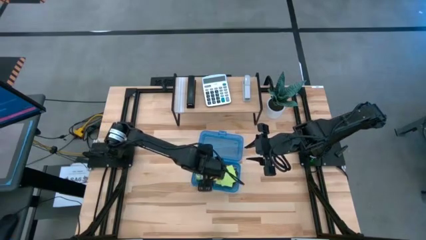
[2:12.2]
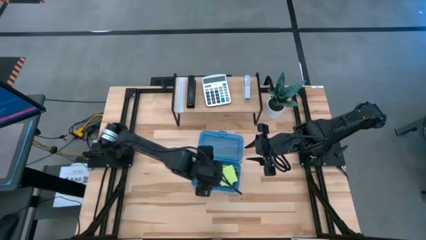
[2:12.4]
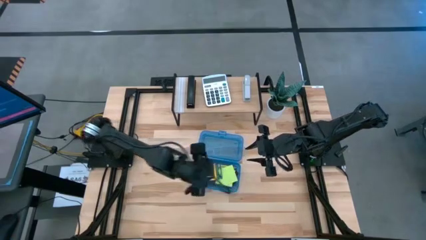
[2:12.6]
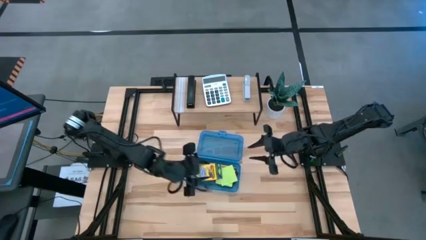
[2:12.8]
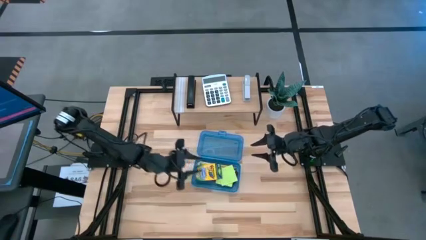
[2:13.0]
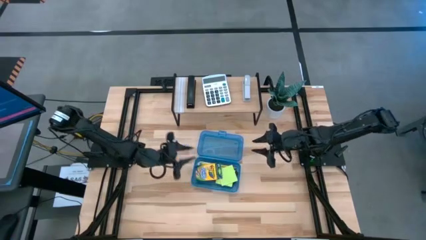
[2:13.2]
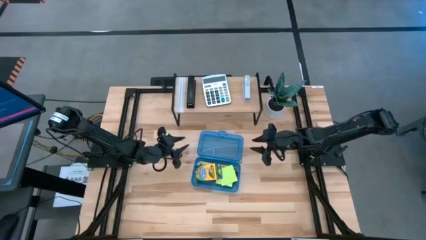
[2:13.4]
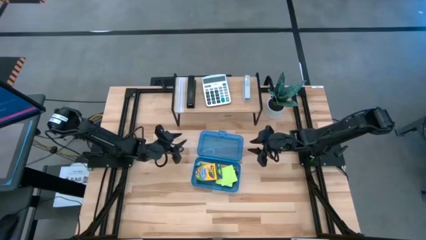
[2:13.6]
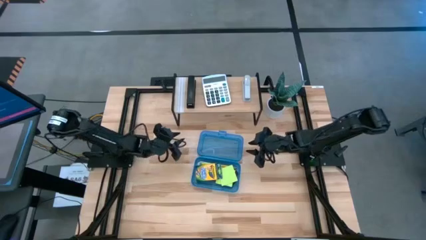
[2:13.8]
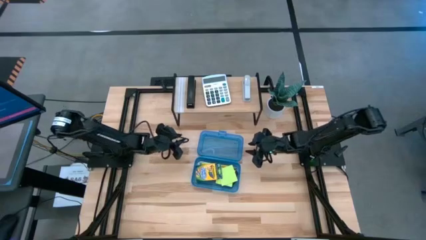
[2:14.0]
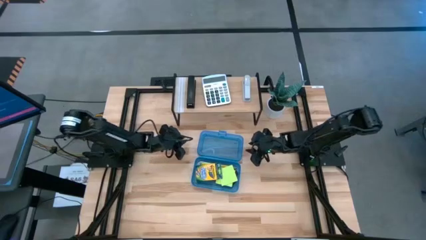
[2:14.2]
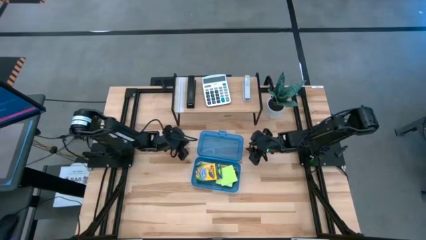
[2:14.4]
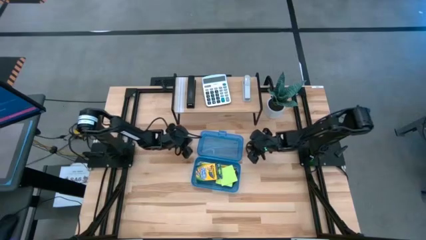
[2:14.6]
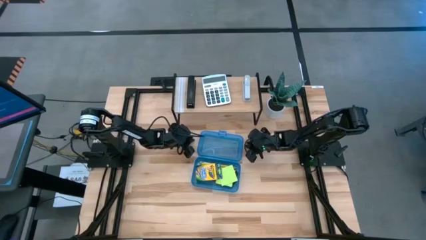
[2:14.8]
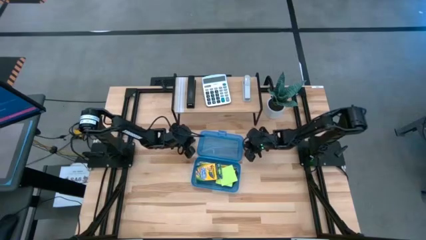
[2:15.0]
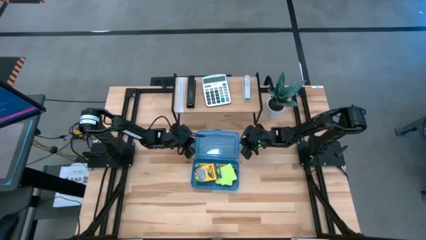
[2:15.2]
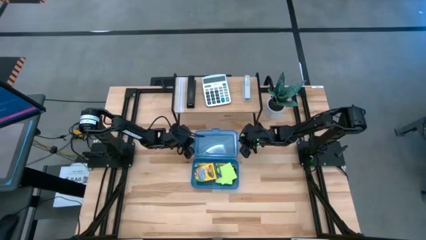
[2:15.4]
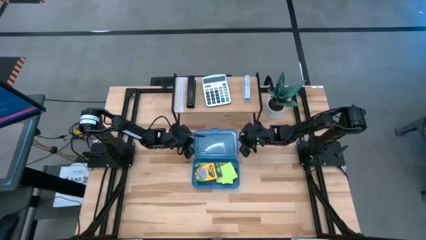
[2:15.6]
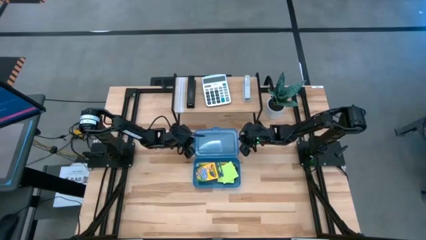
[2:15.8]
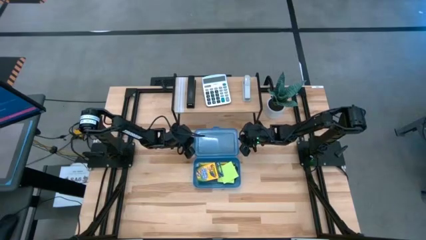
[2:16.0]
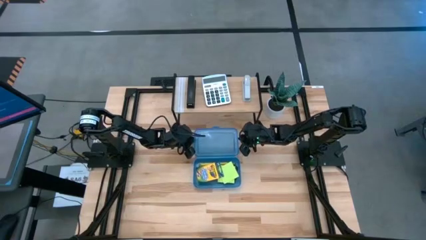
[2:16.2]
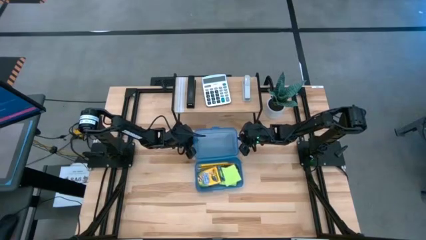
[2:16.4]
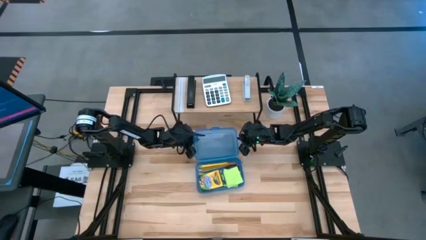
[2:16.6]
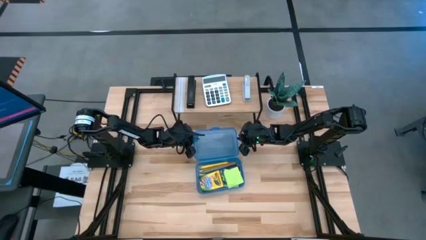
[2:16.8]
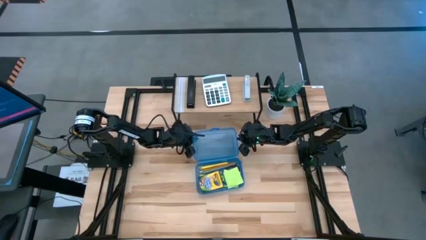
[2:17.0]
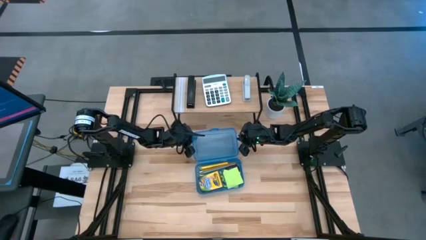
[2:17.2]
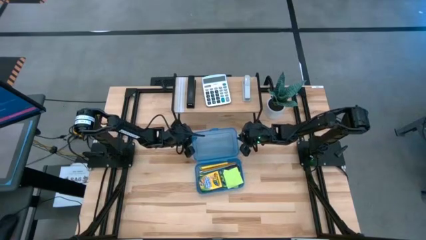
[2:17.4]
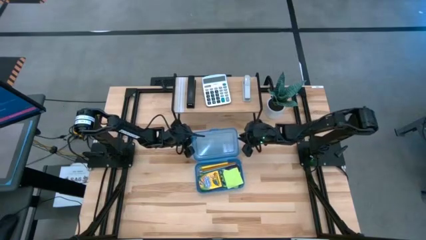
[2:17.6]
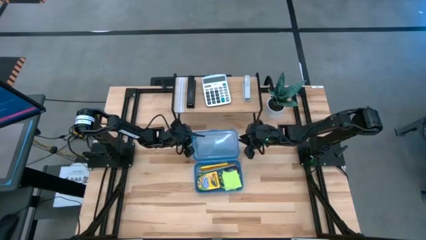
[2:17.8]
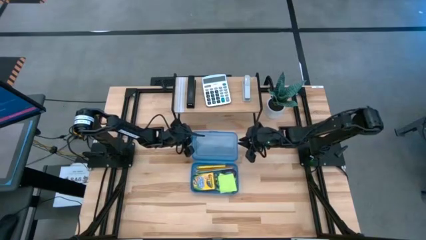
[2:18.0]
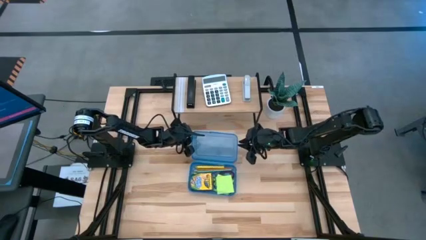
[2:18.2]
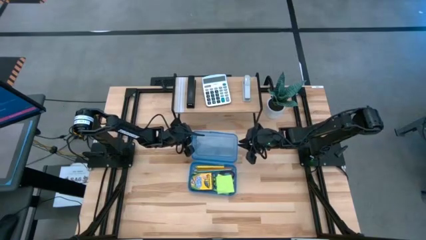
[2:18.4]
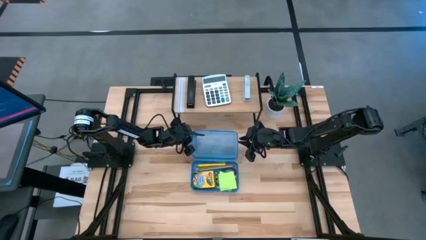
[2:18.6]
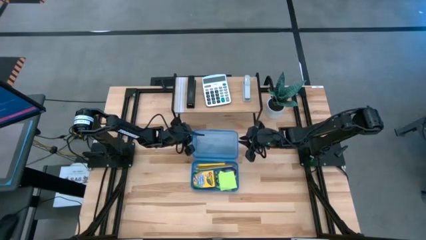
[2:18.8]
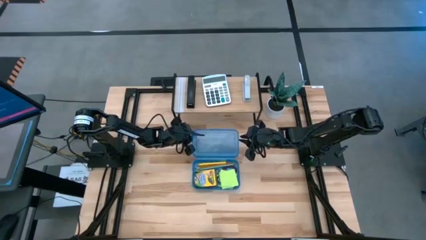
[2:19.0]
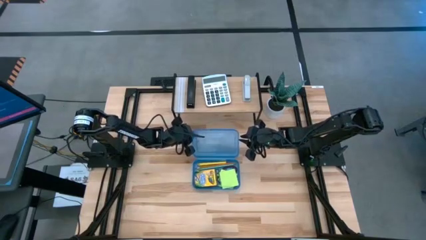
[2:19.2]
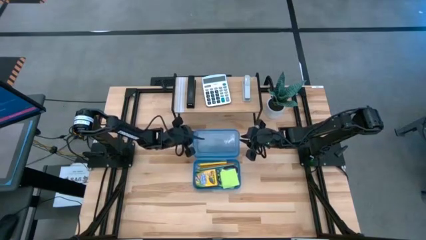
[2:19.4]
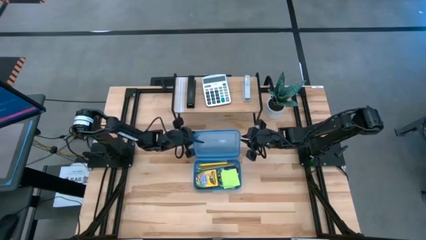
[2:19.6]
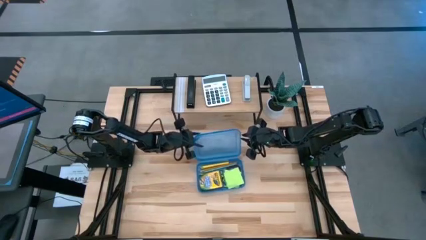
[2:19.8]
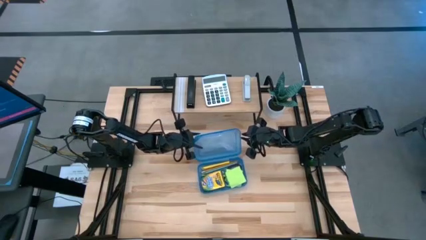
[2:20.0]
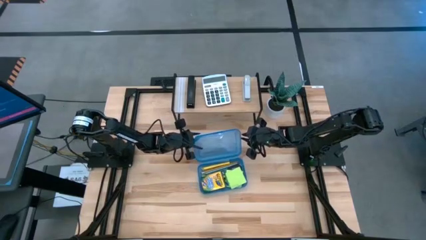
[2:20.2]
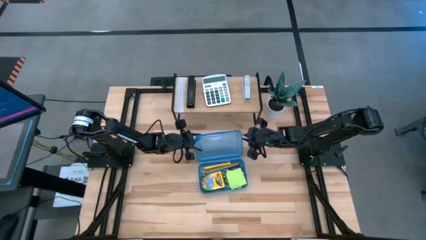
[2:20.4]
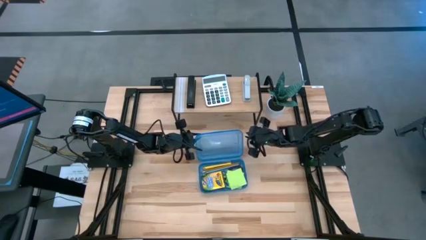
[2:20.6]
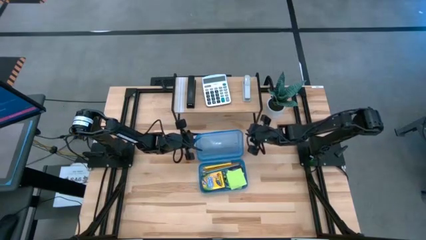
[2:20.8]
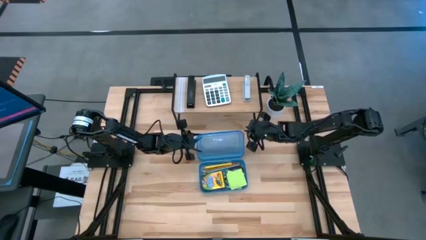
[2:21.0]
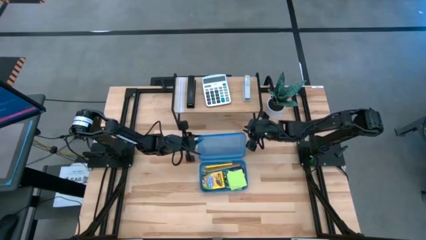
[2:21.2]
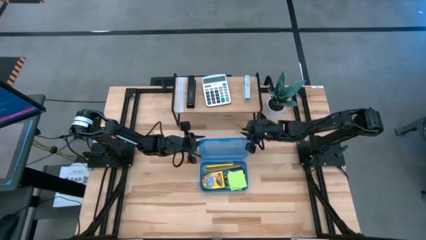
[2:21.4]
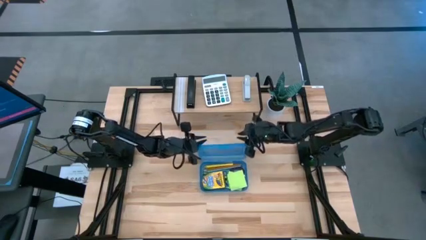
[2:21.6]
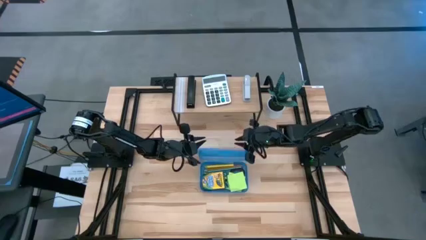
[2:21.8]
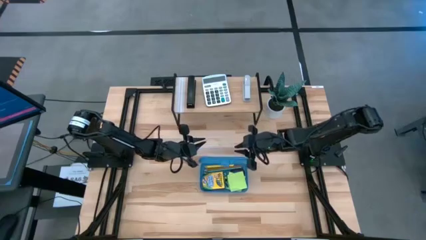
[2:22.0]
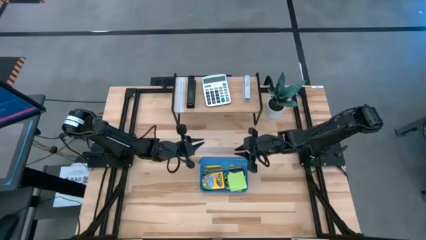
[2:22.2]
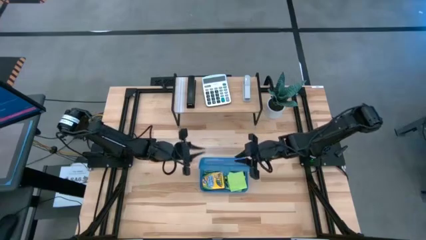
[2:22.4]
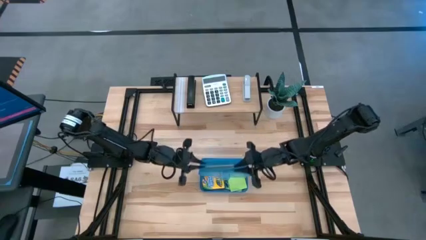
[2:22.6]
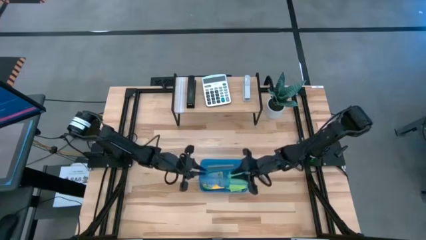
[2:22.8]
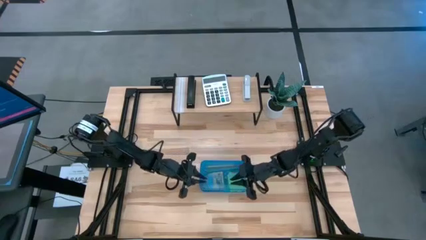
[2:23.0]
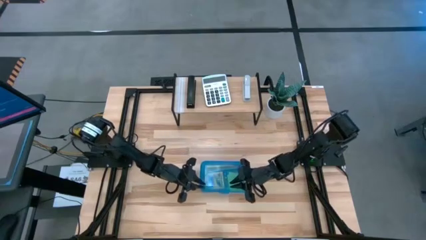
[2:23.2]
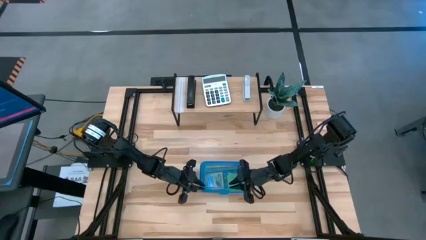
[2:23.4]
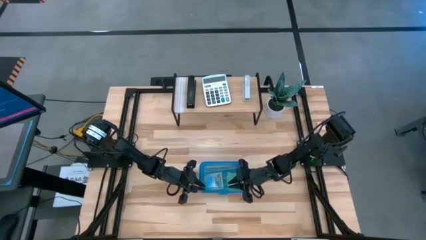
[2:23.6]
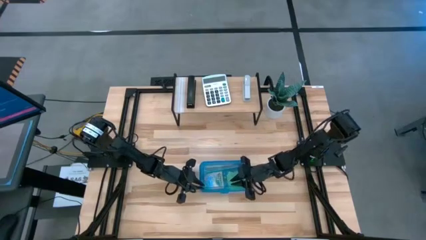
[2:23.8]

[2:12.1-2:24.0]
Task: Pack school essentials
Close the blue supply box

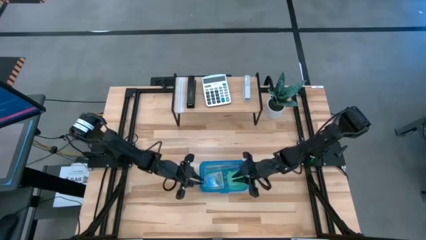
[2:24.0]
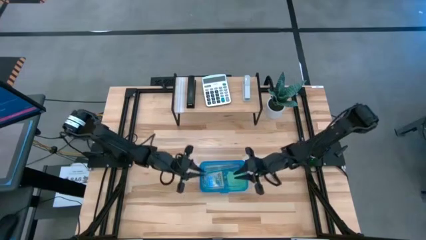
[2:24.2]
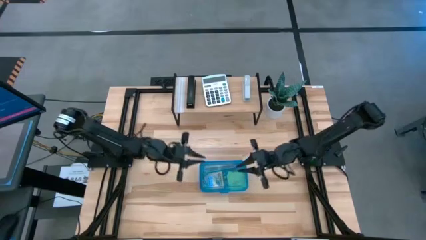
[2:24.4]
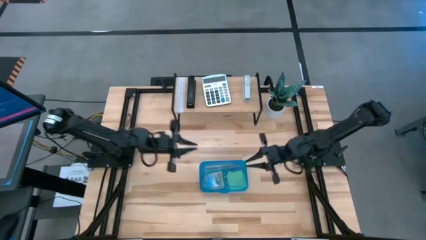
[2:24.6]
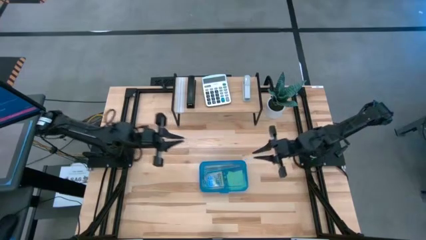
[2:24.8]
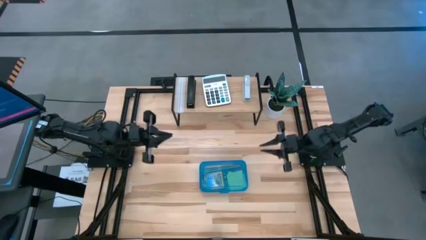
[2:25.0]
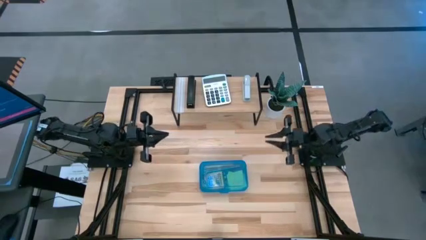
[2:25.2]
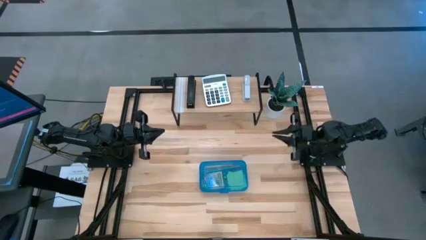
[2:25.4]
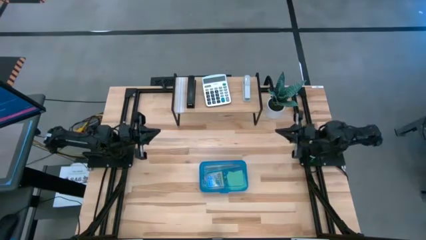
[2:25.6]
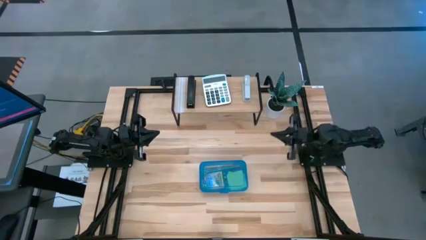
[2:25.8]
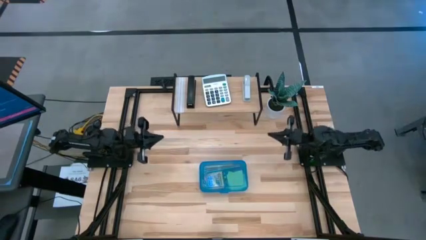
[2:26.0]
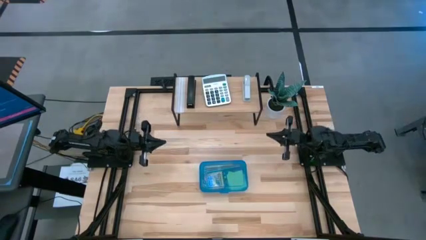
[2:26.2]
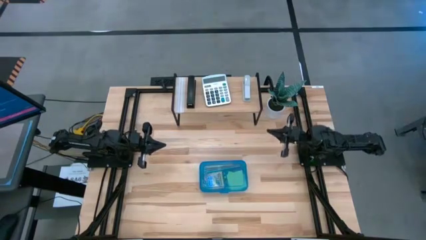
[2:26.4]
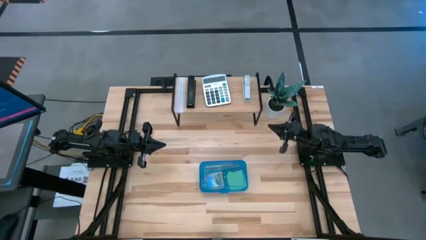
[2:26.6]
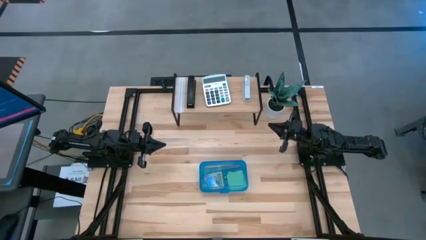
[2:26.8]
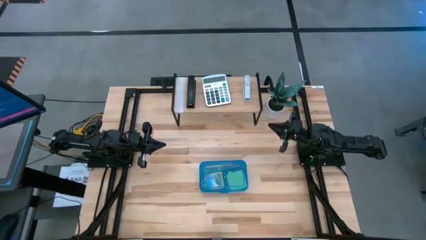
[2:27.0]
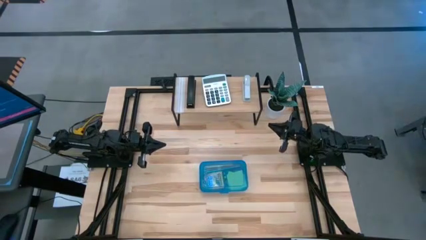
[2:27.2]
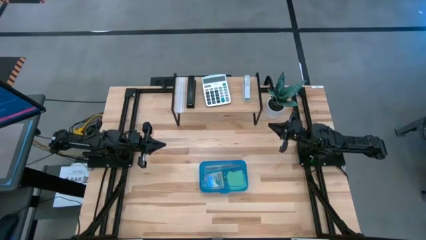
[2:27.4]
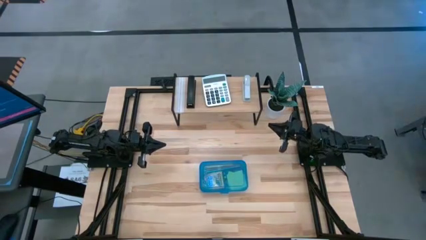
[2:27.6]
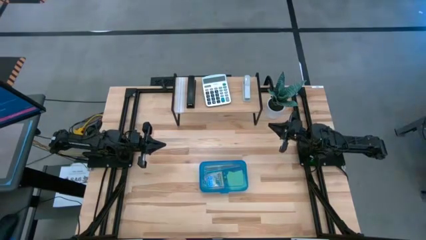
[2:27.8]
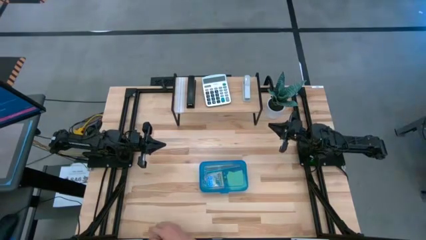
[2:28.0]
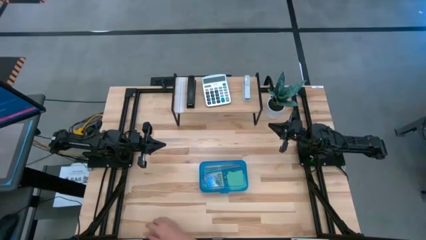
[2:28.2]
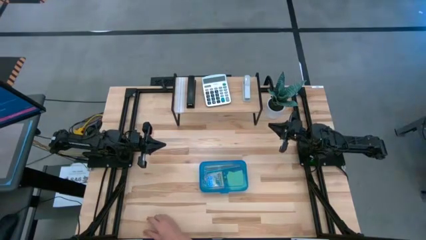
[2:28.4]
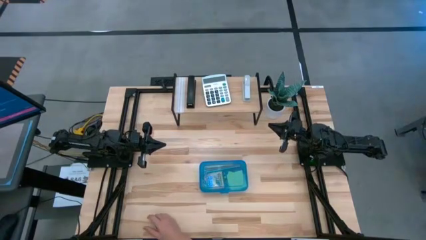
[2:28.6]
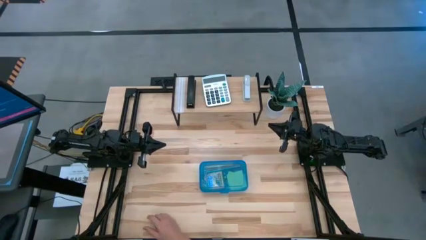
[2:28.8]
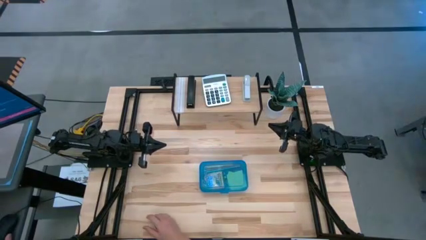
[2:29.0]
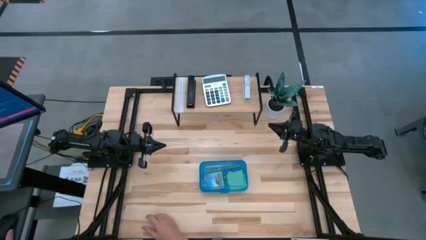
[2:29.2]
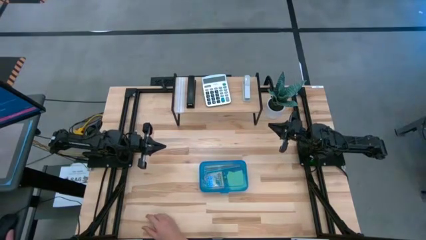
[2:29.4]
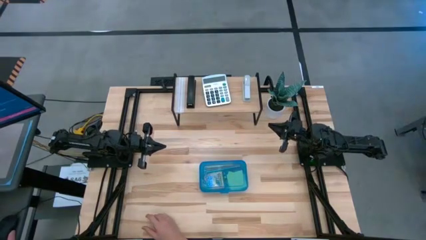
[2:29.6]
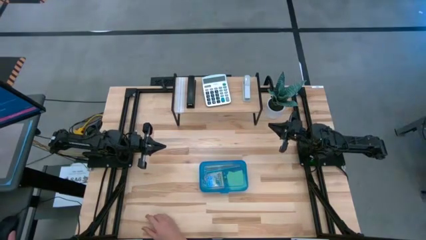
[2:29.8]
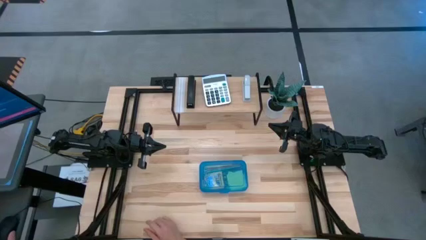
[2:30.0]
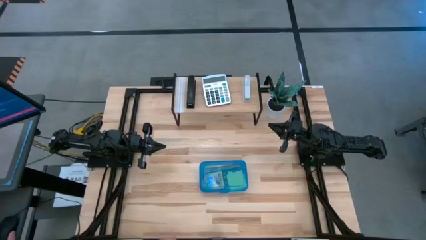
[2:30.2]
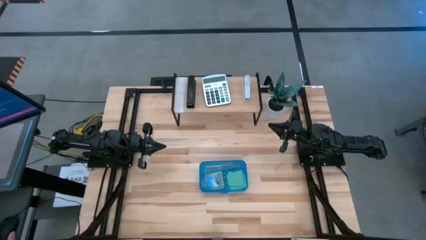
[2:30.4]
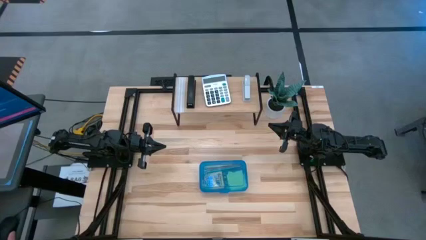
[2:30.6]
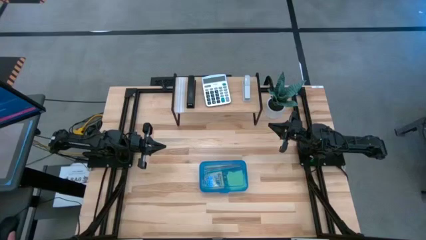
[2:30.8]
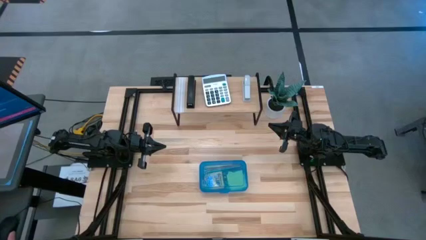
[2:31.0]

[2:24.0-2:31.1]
Return to Home Position
